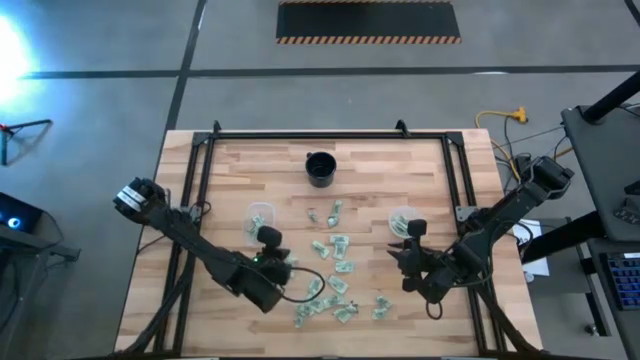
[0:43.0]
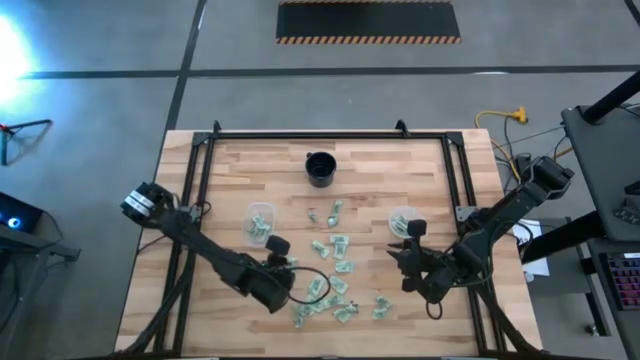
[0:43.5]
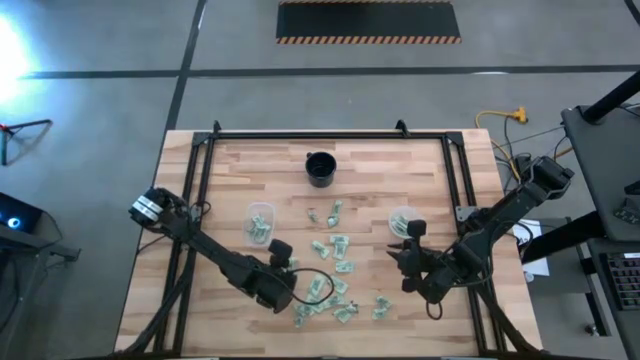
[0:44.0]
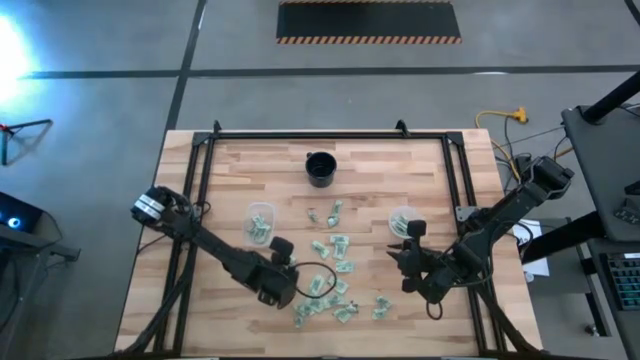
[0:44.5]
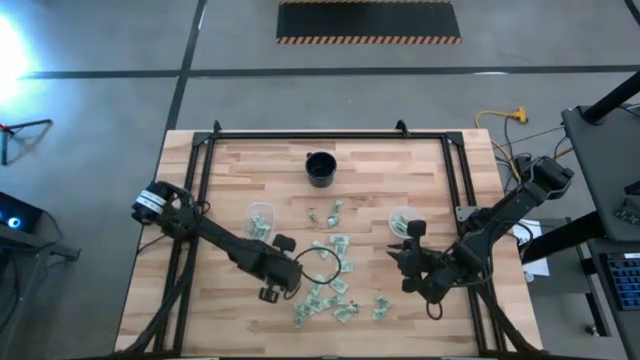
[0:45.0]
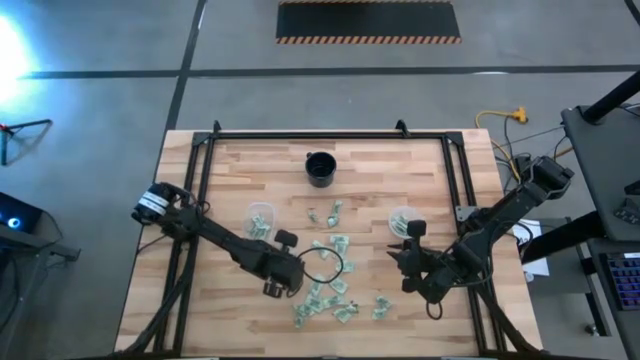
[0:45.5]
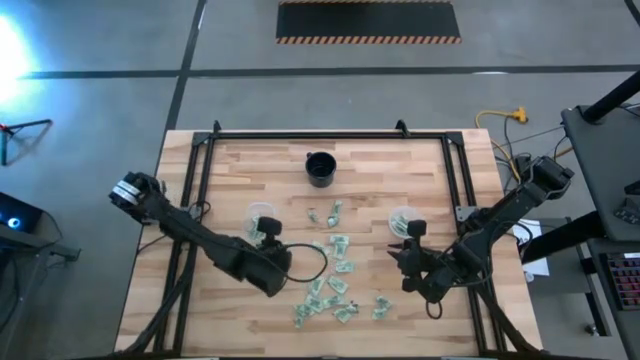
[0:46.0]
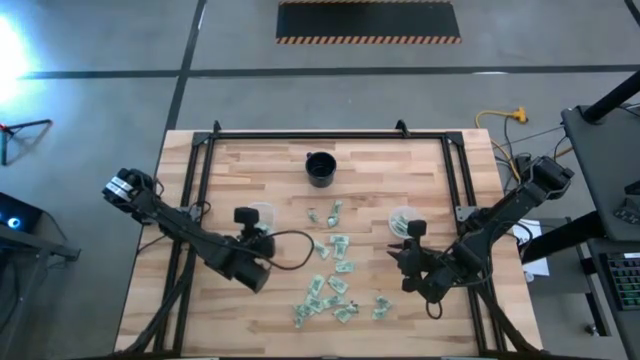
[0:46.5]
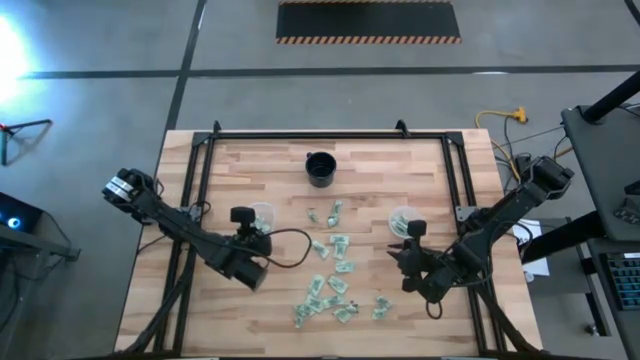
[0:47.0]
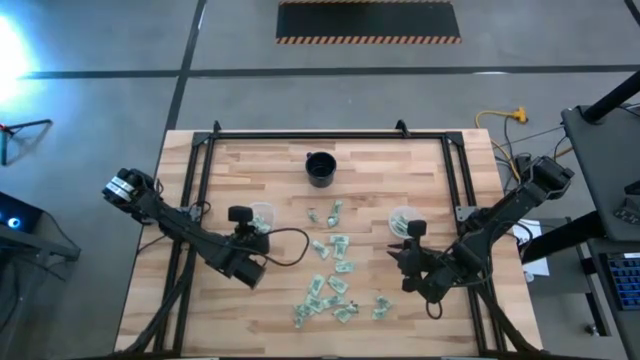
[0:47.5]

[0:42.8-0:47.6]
Task: Pick and place Stevia / Truvia into bins
Put the light green stevia packet into the rectangular container

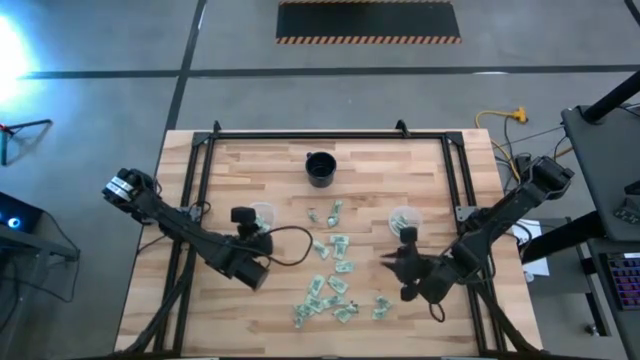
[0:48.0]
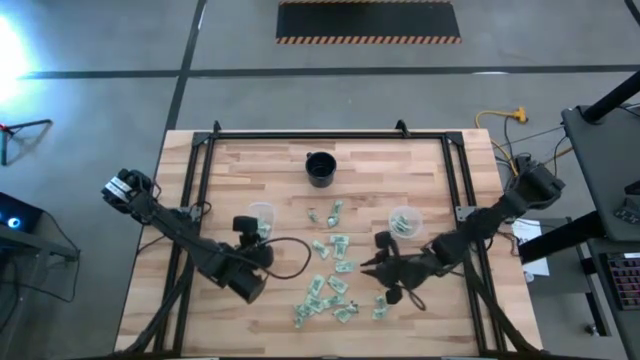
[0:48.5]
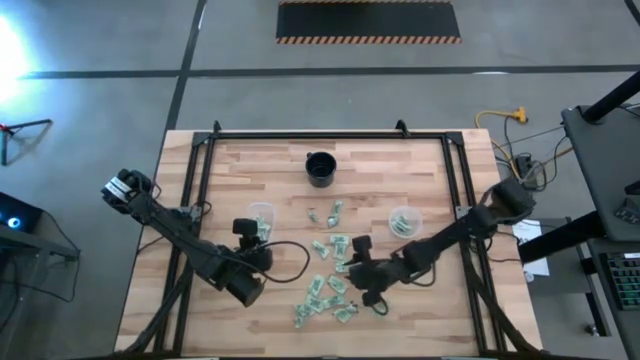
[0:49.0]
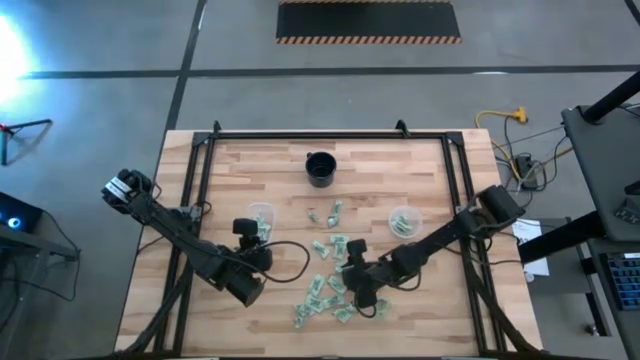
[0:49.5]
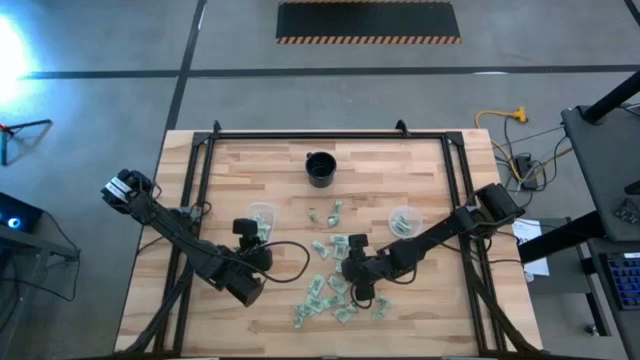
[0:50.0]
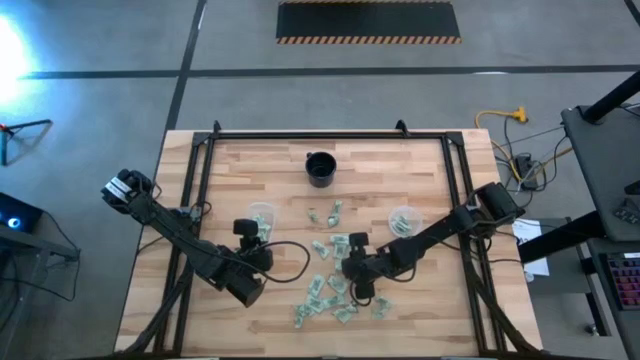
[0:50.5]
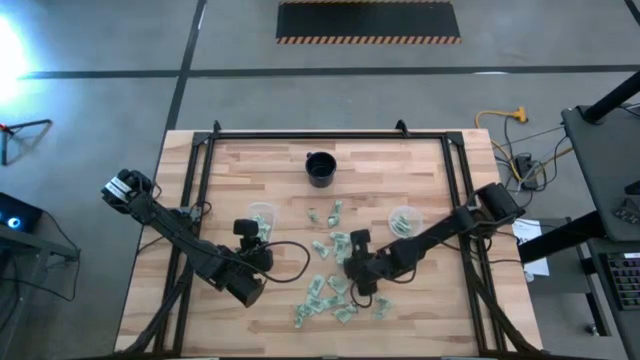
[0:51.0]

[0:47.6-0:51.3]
Put the light green stevia packet into the circular container

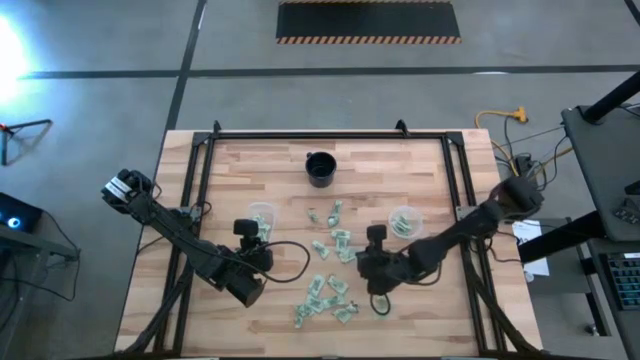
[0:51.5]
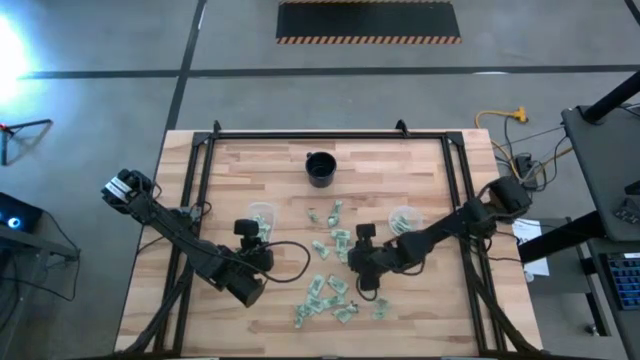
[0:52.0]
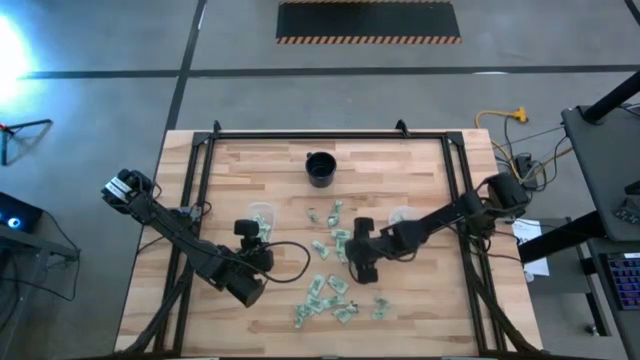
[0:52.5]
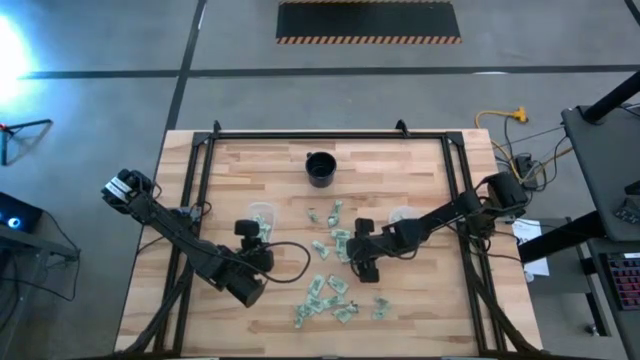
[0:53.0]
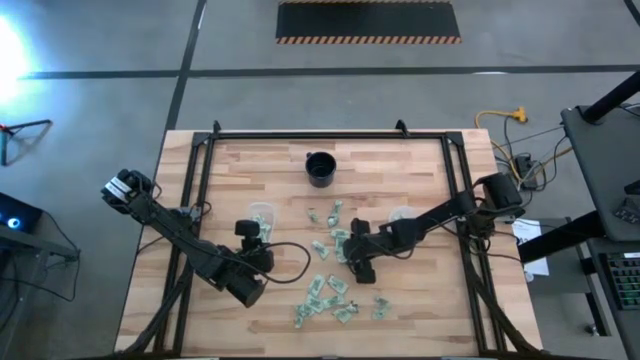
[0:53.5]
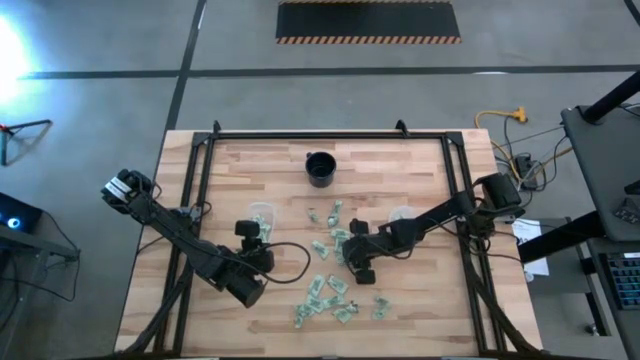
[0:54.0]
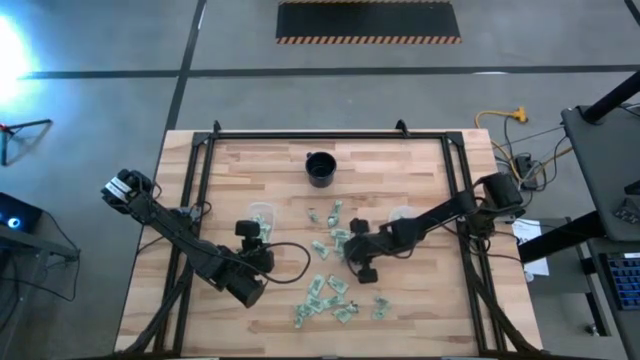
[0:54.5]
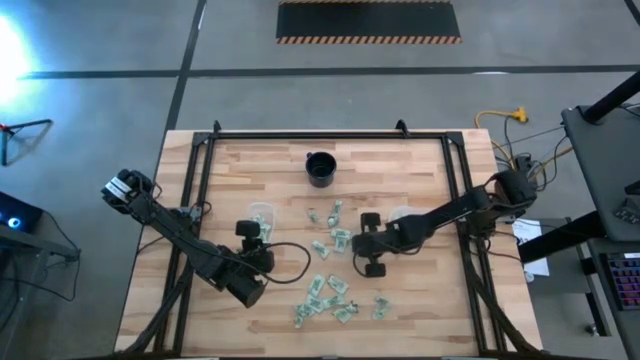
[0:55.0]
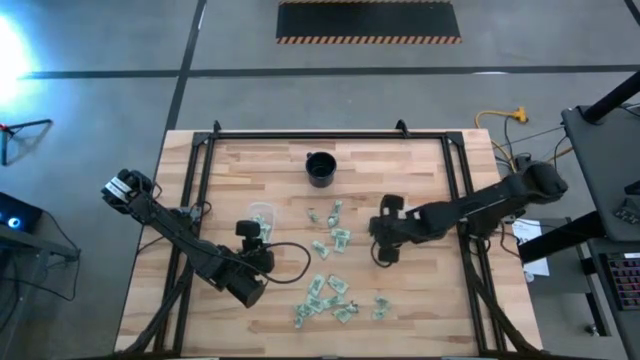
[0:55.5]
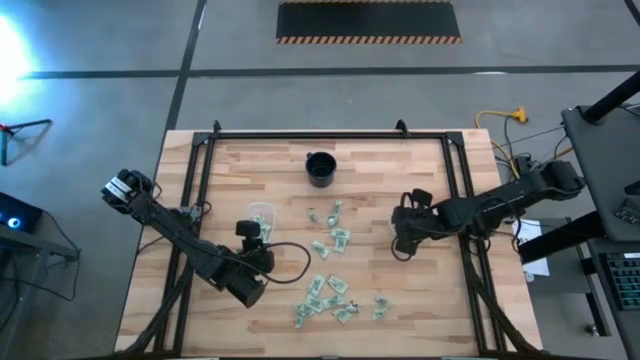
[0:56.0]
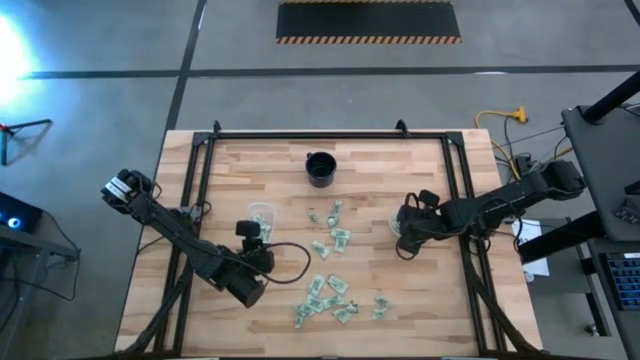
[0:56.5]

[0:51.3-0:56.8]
Put the light green stevia packet into the circular container

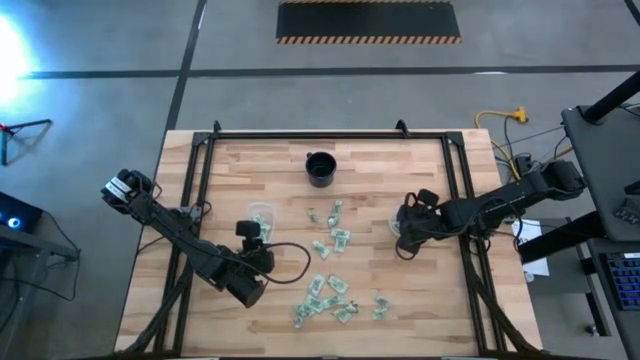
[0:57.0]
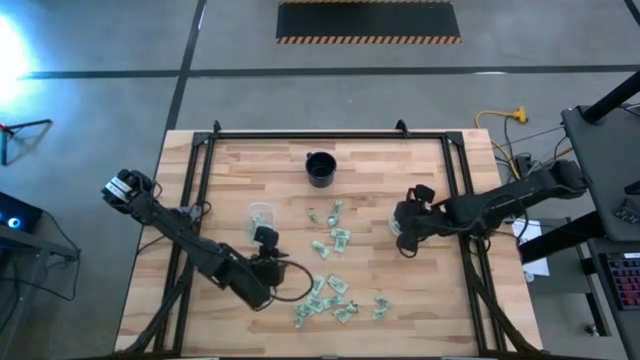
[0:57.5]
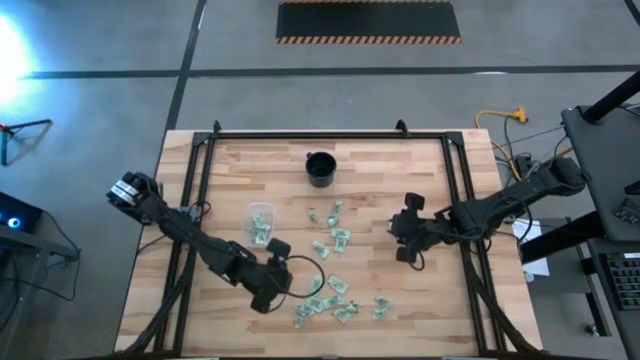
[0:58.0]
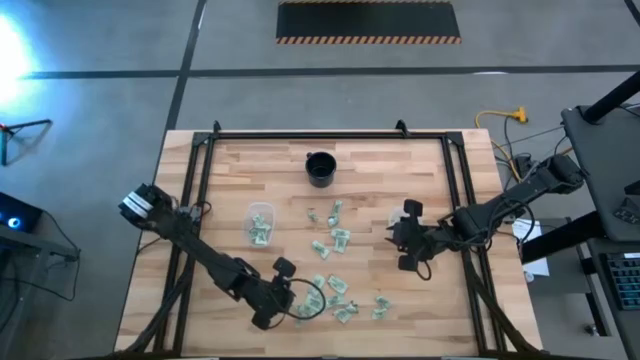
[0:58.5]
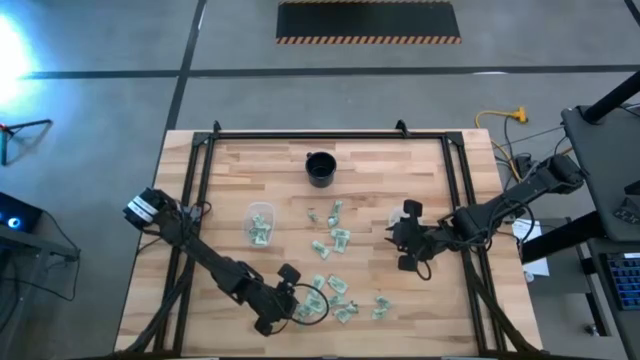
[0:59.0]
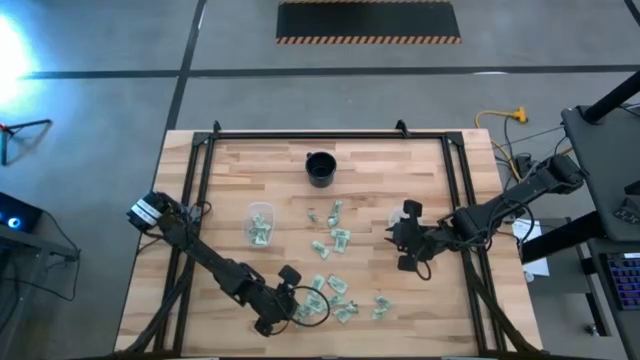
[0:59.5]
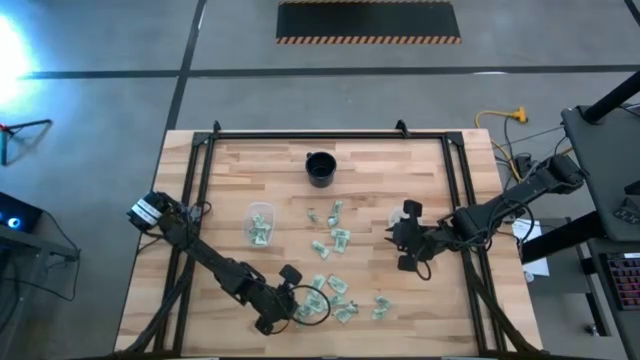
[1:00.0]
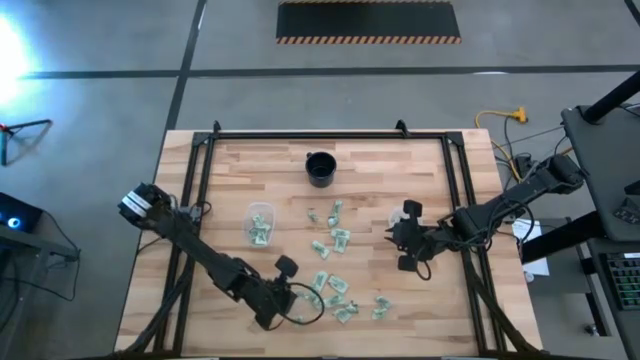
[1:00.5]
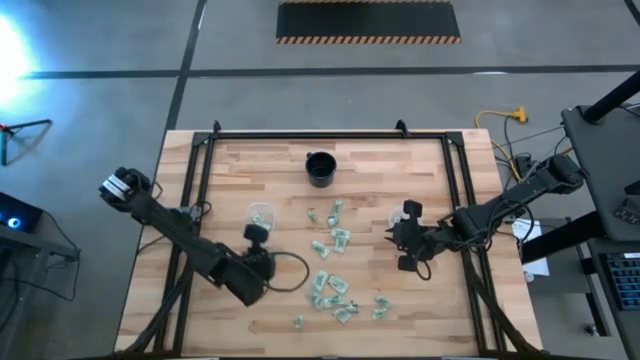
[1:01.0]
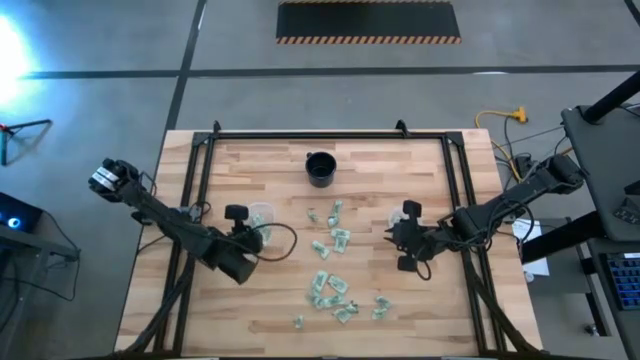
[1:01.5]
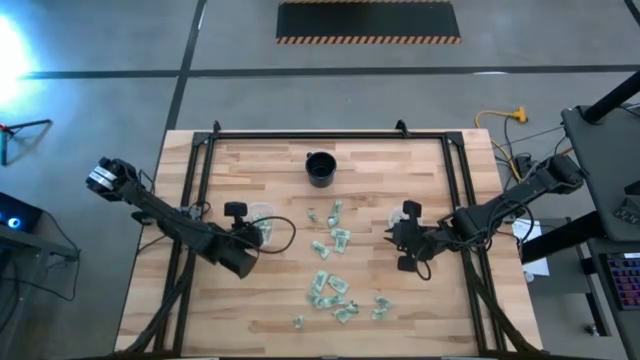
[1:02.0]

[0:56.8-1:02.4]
Put the light green stevia packet into the rectangular container
